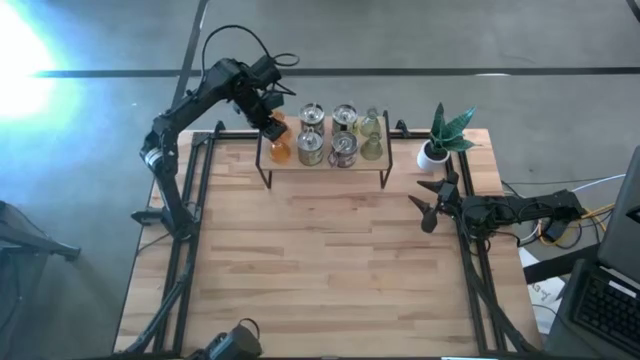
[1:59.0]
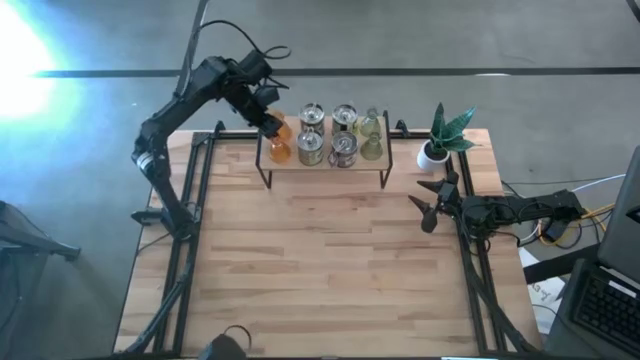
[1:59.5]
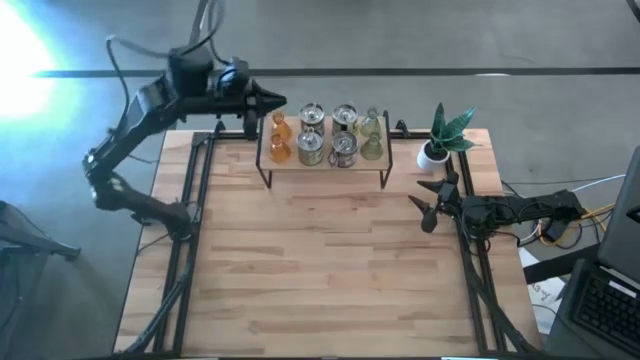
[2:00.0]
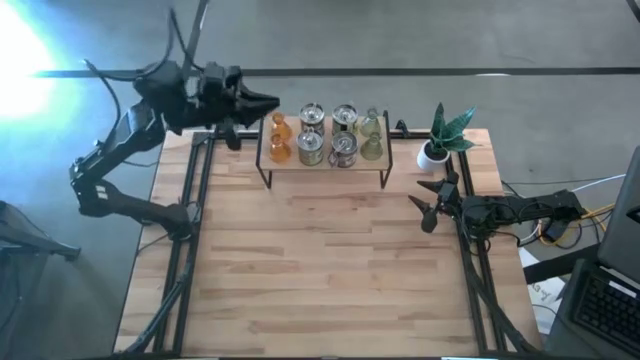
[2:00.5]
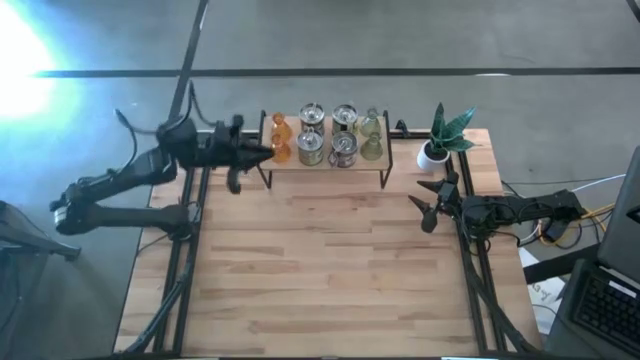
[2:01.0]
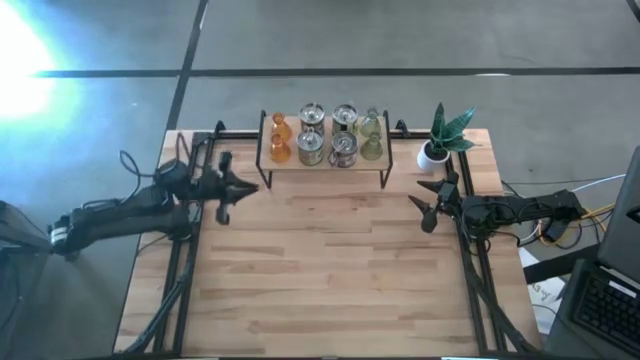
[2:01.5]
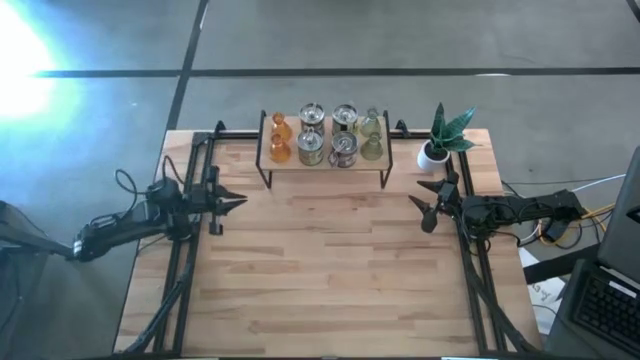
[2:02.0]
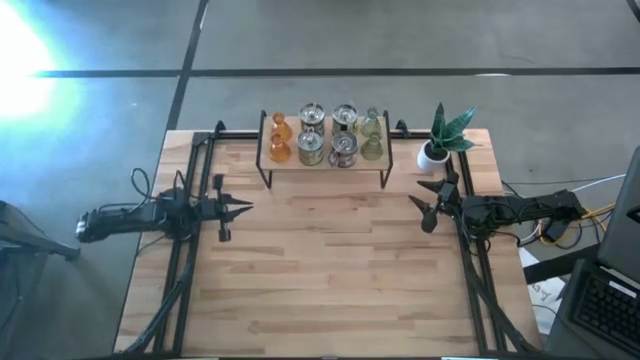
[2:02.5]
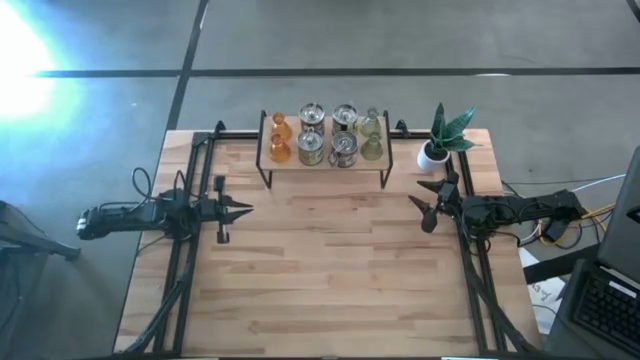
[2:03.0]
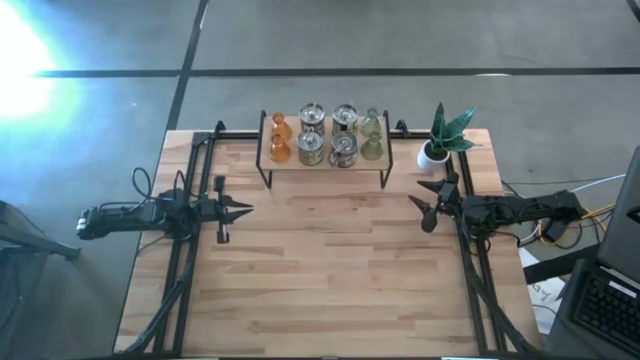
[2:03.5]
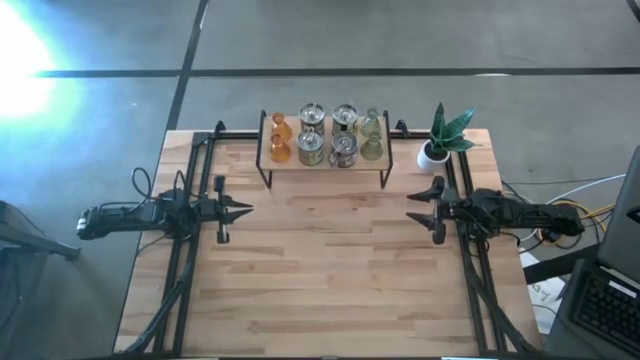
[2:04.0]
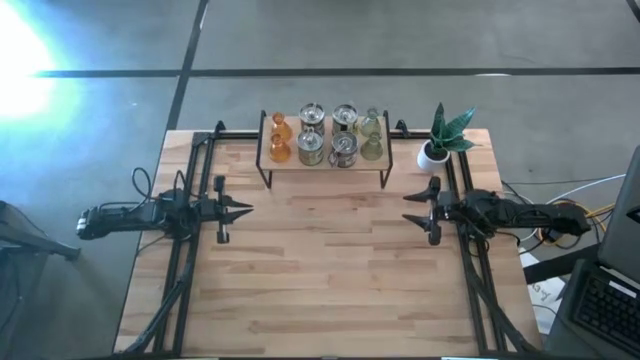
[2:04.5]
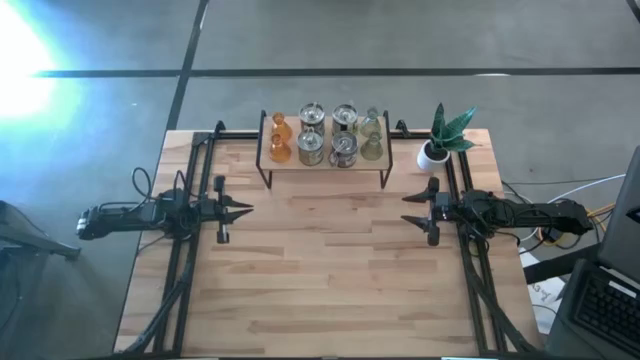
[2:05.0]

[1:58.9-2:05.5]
Task: Pick & Place candle stick holders
Return to Home Position

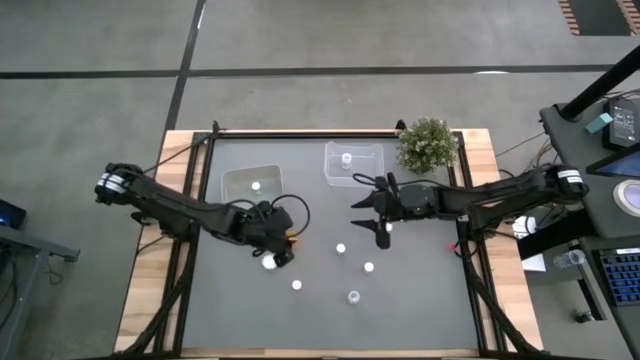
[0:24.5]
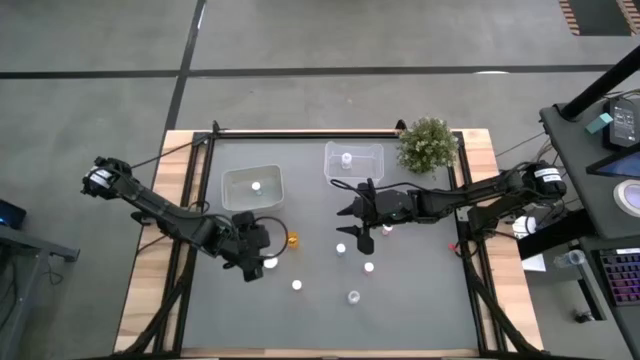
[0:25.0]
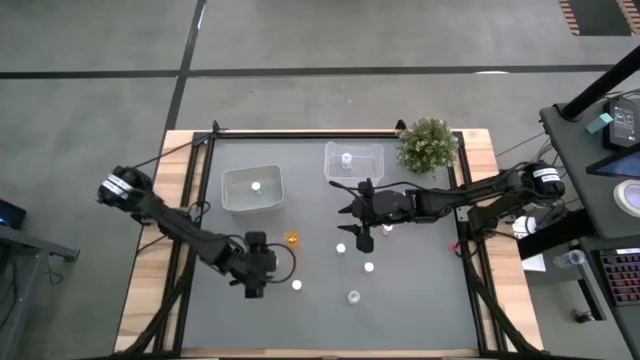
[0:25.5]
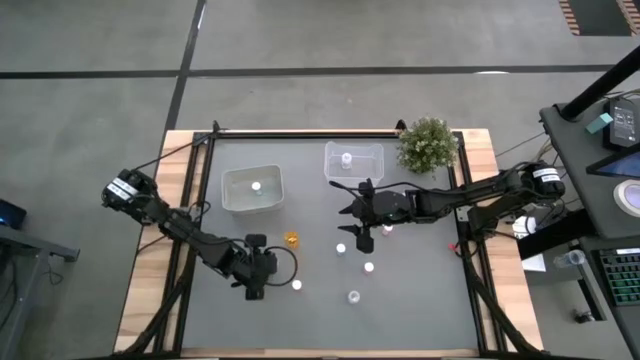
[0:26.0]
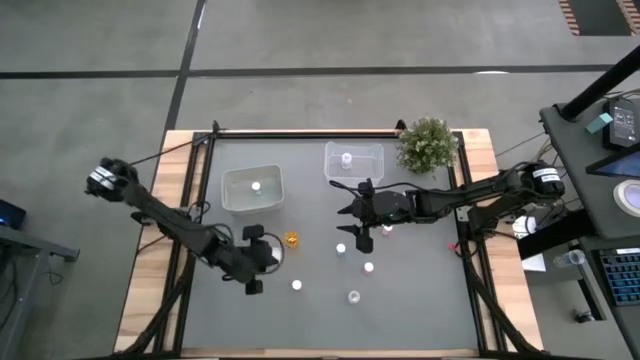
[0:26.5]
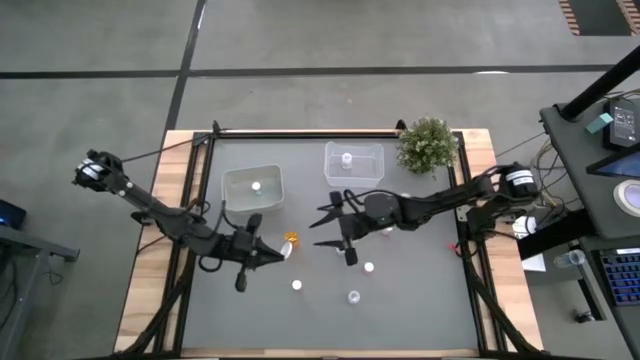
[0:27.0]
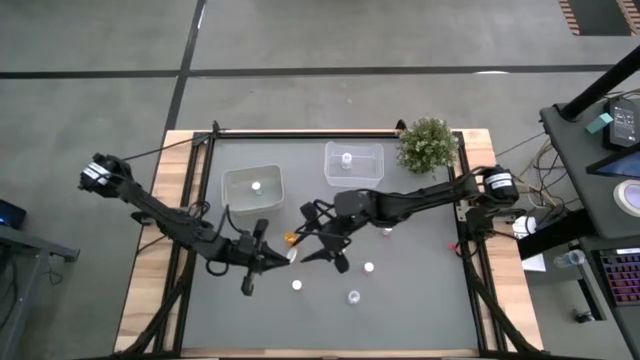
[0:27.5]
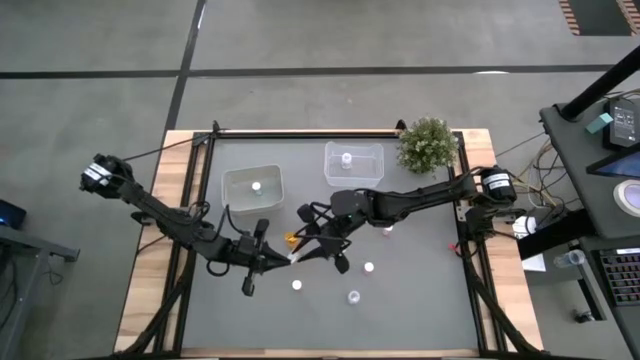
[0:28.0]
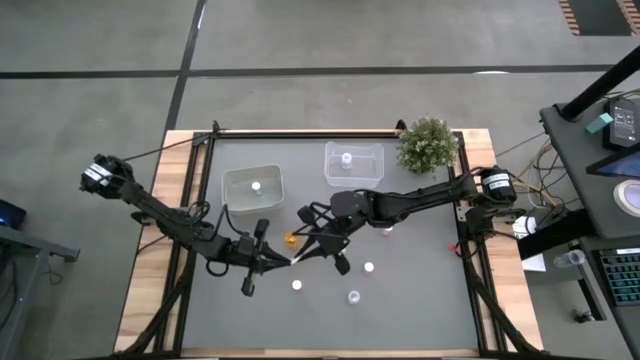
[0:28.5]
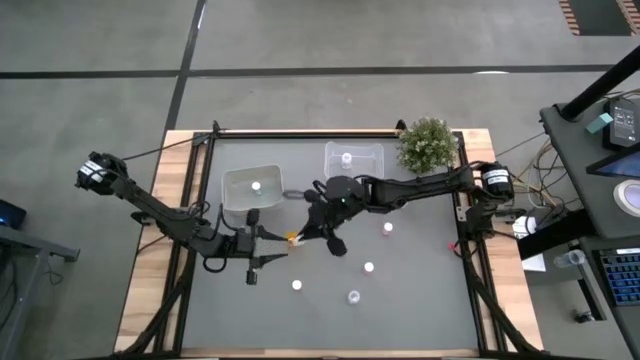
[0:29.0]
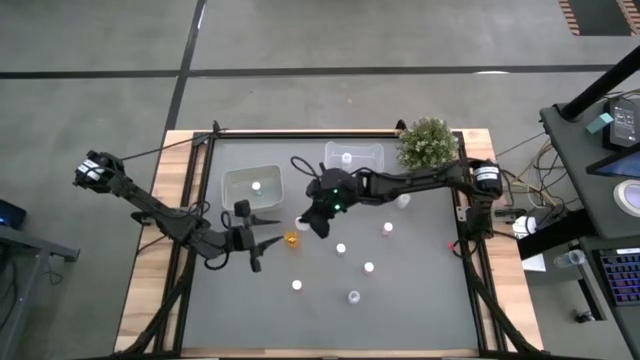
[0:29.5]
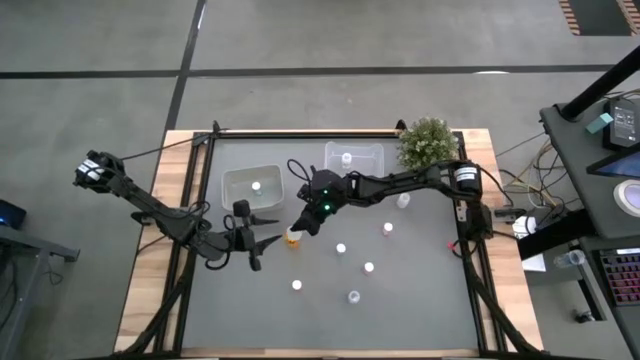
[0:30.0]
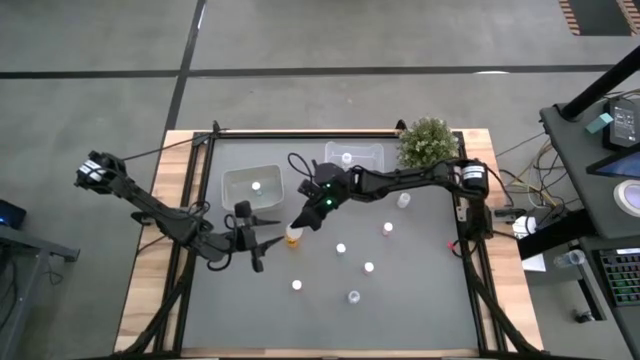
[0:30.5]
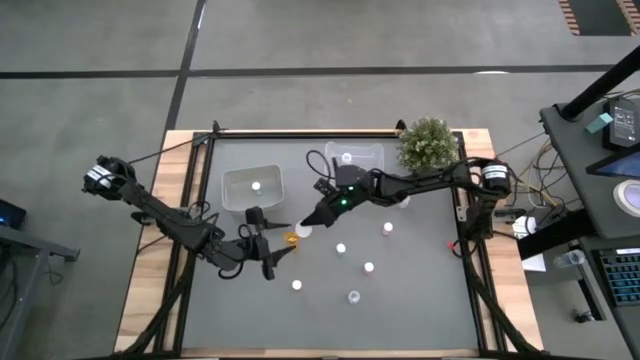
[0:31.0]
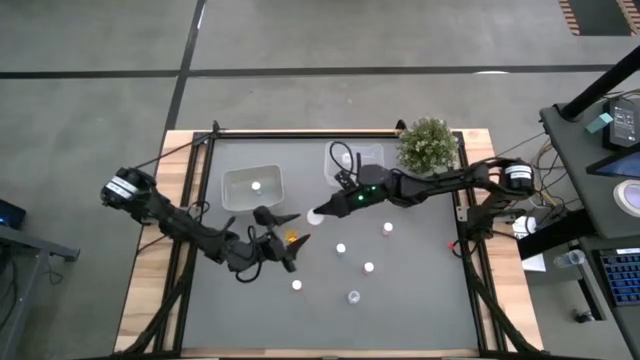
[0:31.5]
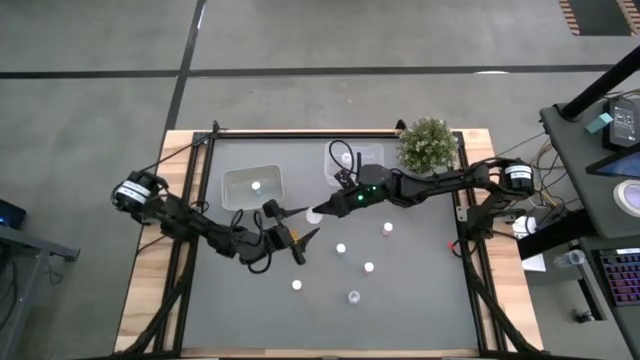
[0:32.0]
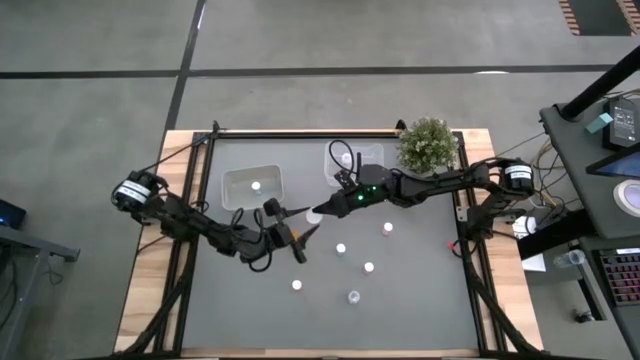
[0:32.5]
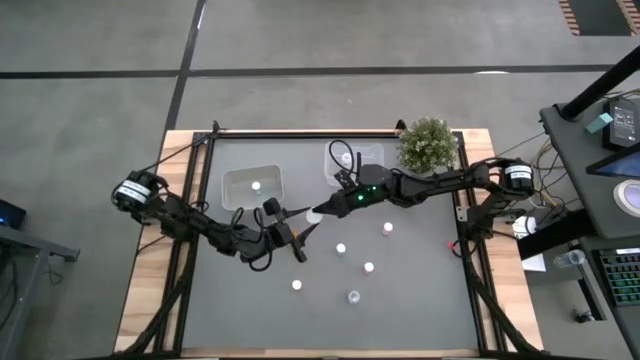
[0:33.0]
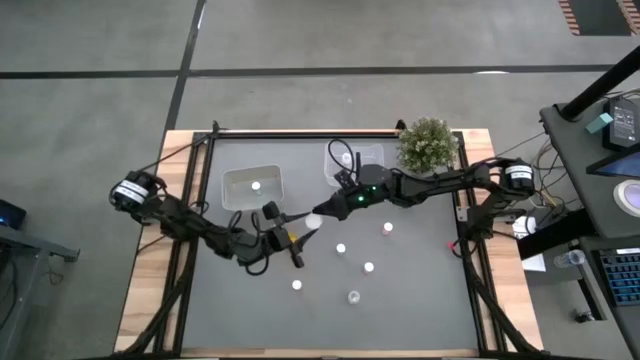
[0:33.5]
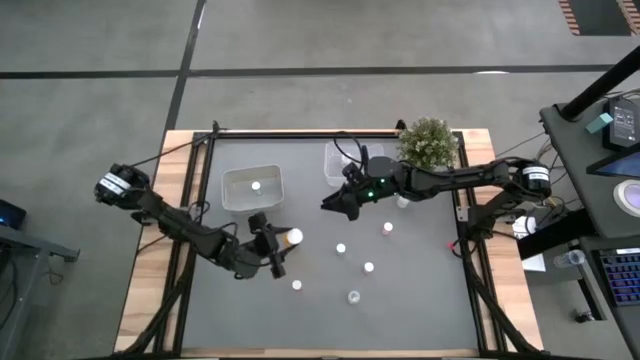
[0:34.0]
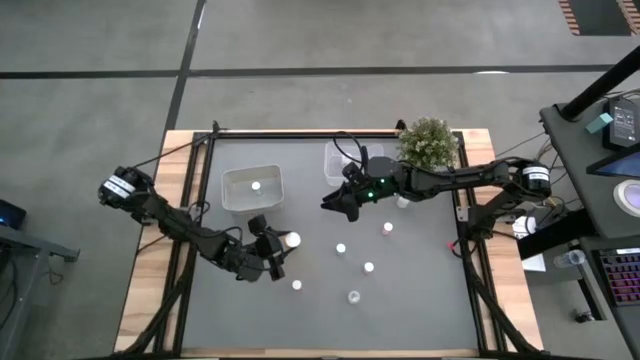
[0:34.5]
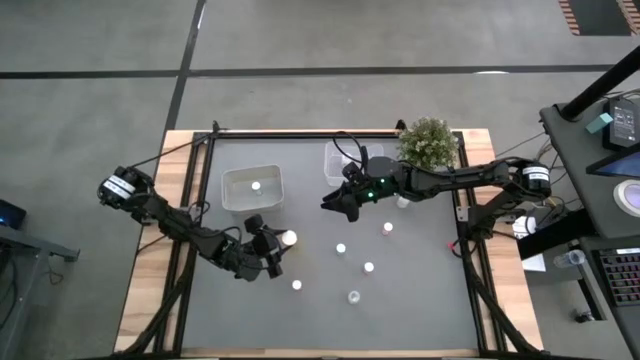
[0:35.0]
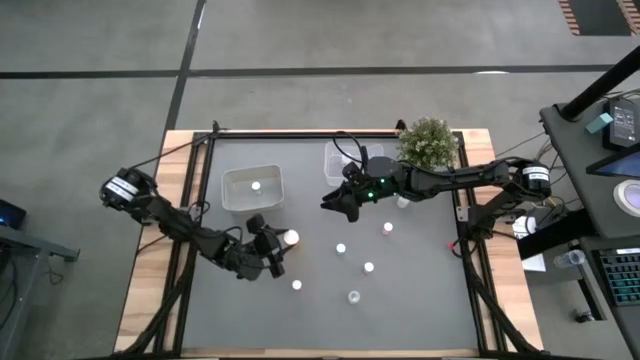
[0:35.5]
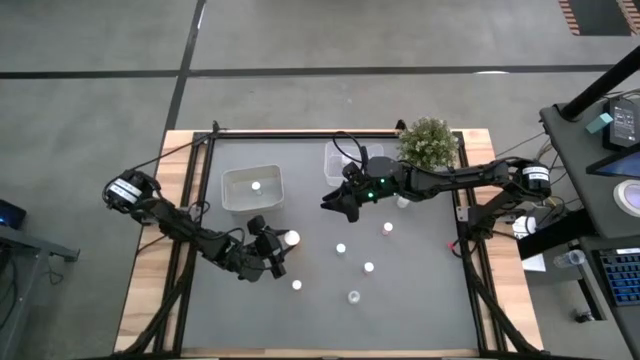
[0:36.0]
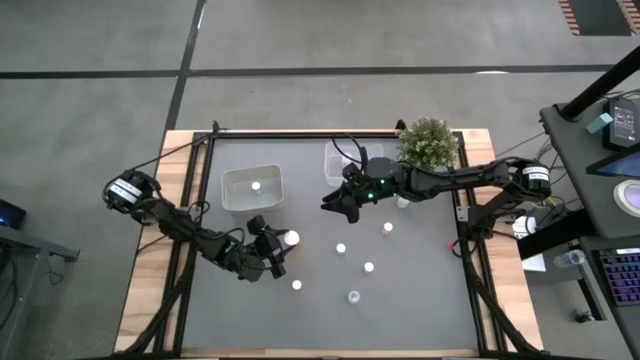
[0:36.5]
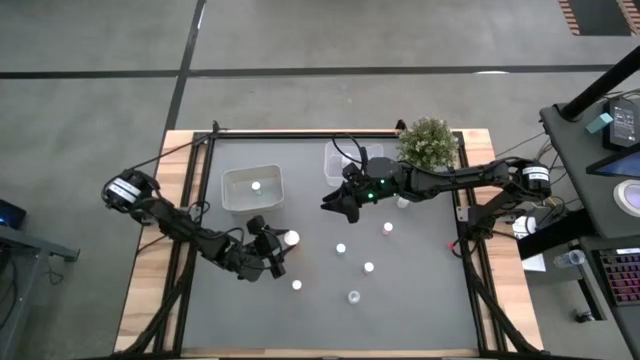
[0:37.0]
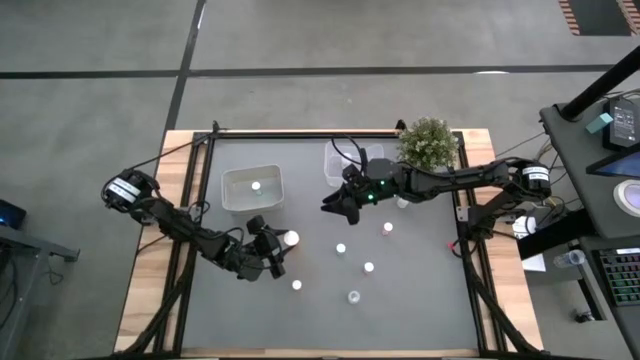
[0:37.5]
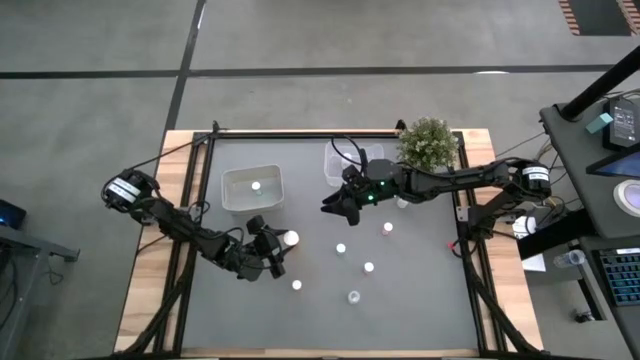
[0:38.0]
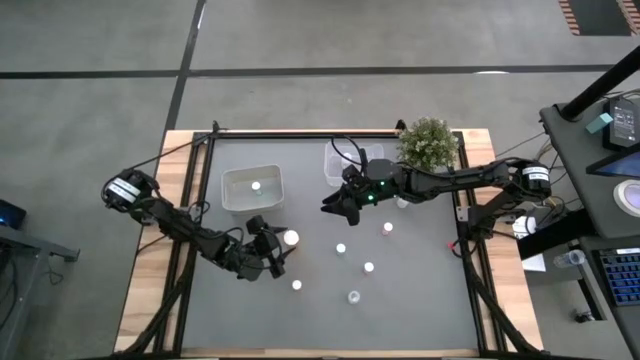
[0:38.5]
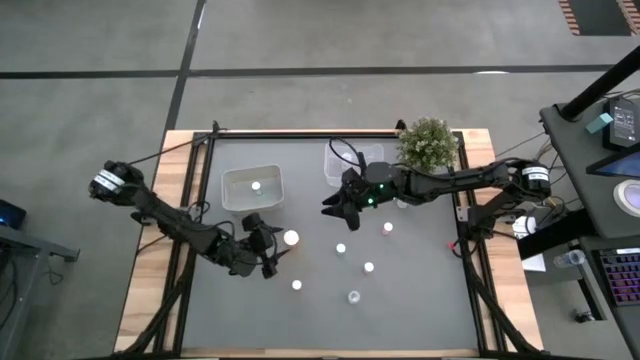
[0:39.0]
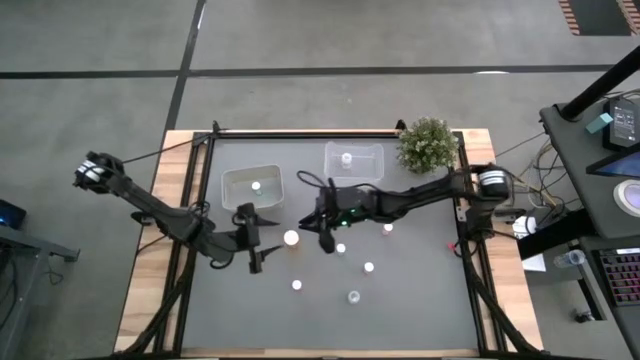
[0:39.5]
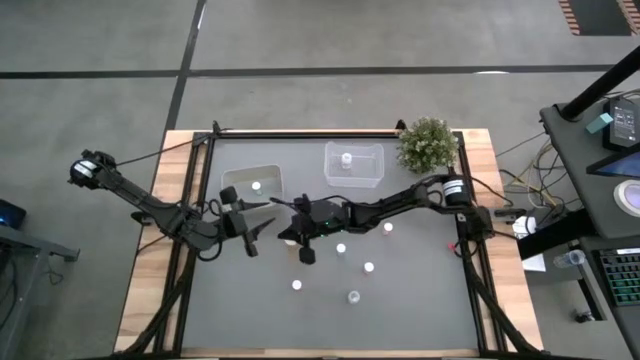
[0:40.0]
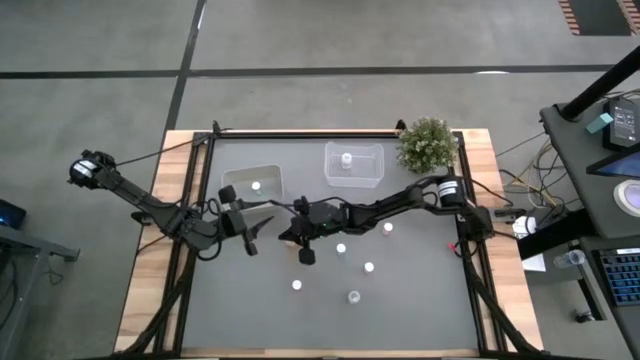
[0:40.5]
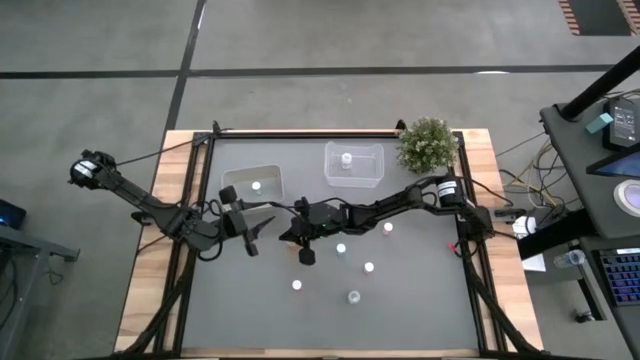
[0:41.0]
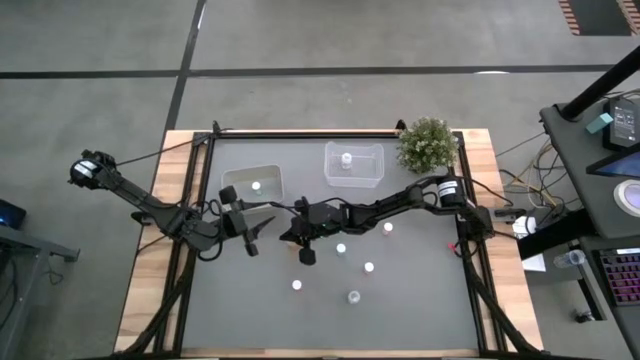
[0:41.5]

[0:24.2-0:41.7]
Task: Pick and place medicine bottles into bin by pill shape (circle, oval)
Put the big orange pill bottle into the transparent bin
